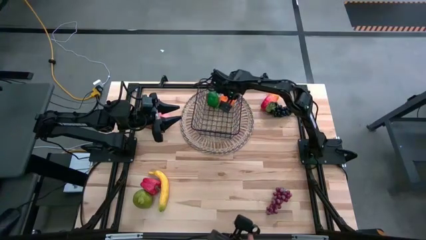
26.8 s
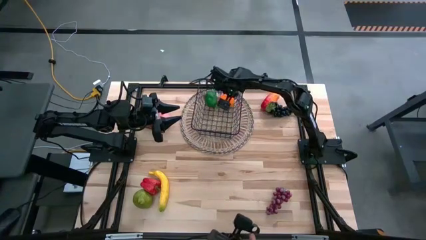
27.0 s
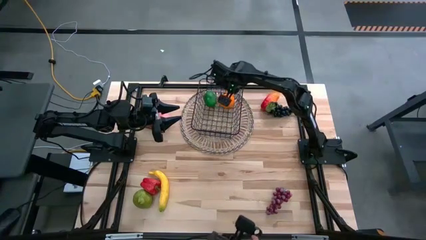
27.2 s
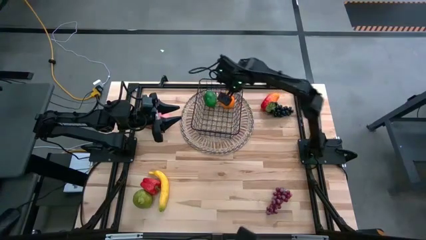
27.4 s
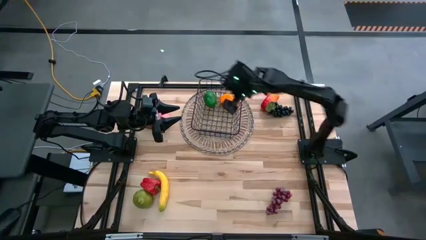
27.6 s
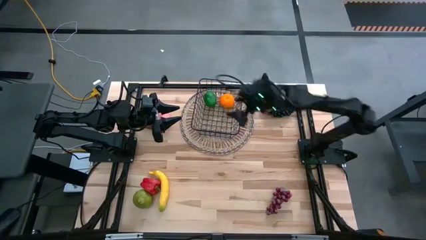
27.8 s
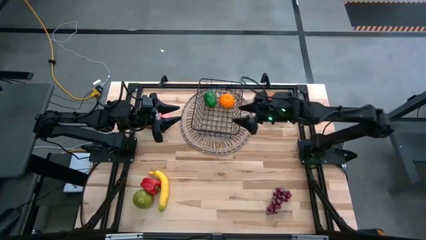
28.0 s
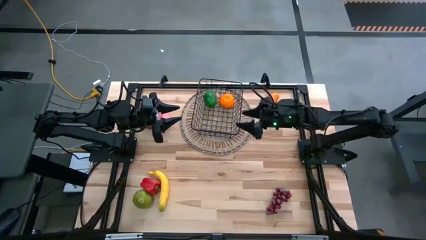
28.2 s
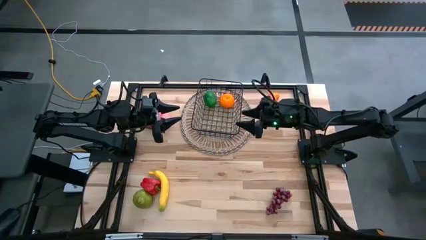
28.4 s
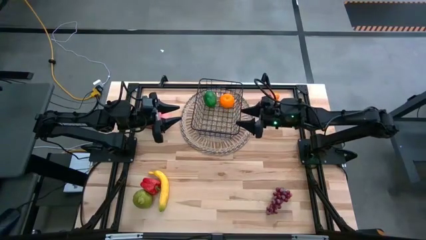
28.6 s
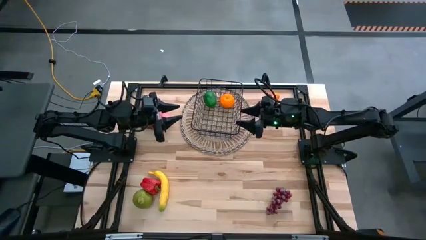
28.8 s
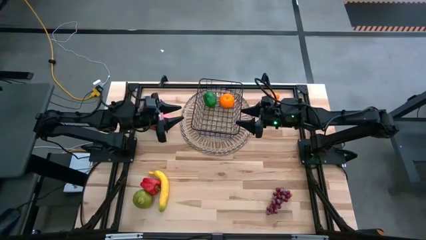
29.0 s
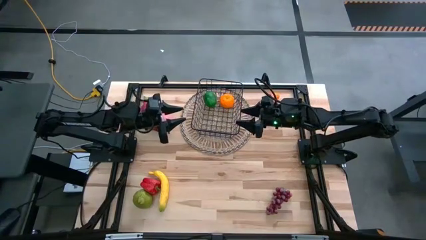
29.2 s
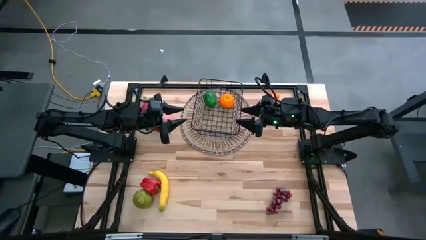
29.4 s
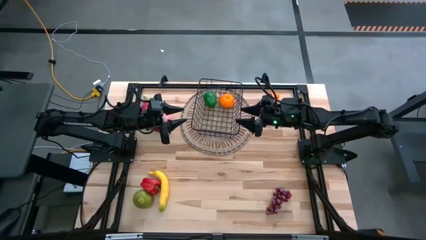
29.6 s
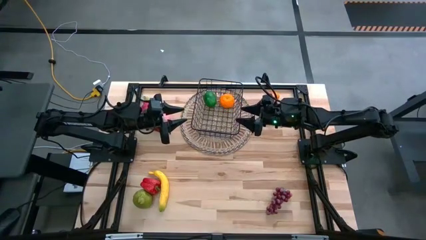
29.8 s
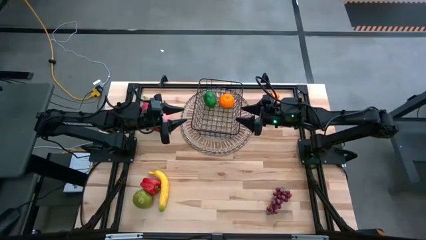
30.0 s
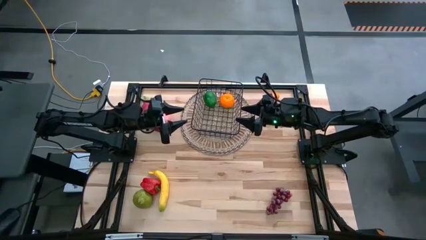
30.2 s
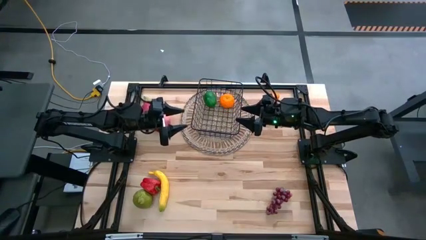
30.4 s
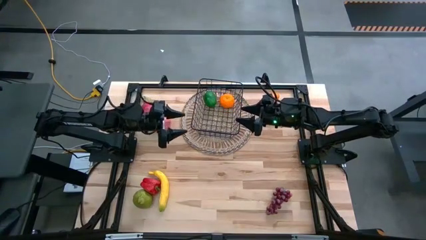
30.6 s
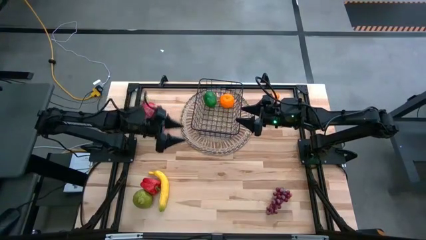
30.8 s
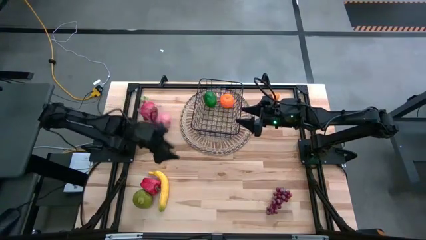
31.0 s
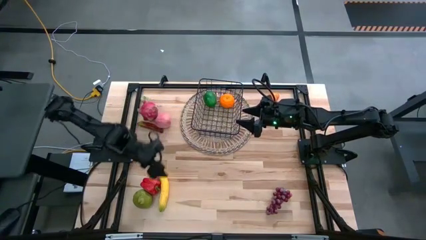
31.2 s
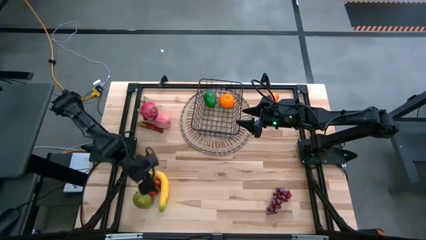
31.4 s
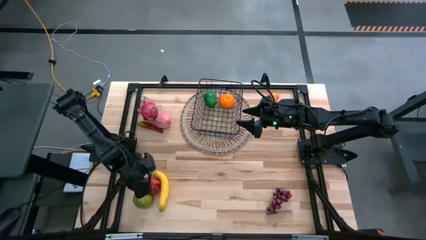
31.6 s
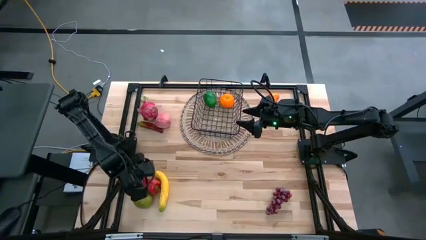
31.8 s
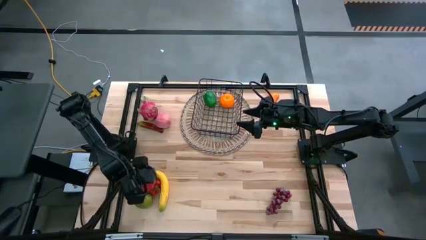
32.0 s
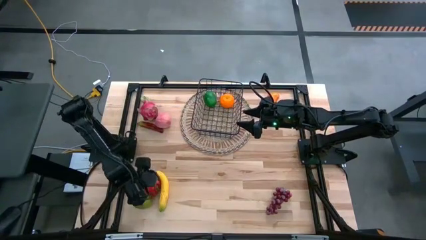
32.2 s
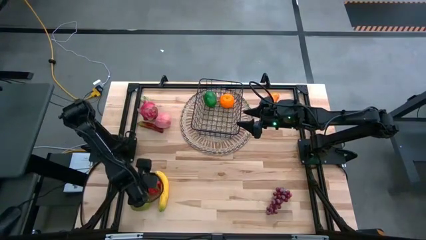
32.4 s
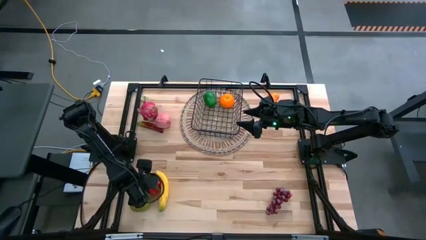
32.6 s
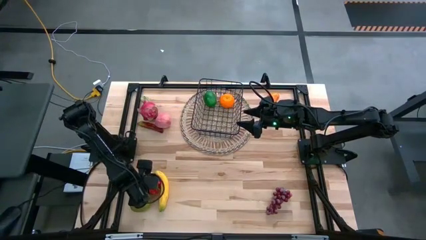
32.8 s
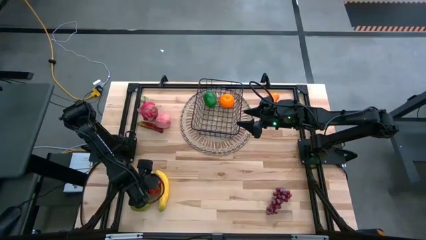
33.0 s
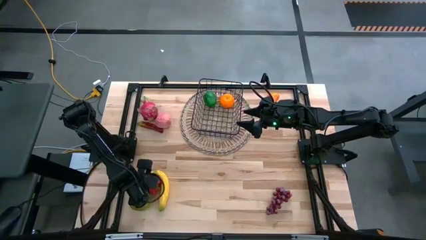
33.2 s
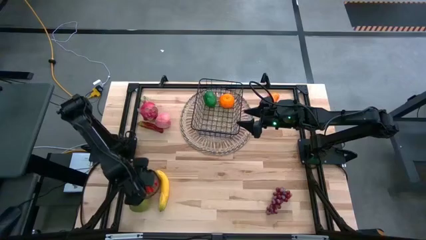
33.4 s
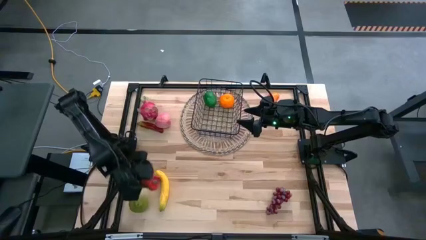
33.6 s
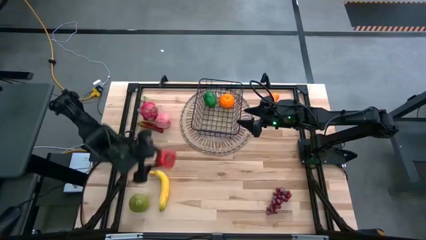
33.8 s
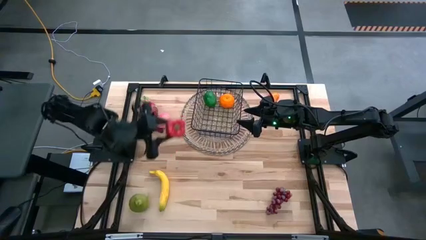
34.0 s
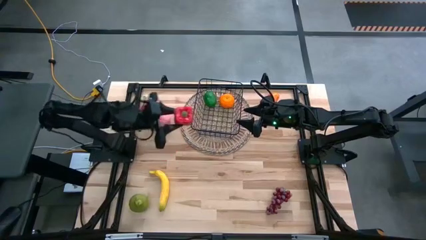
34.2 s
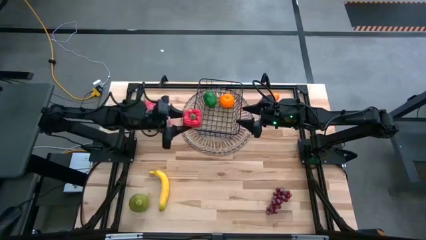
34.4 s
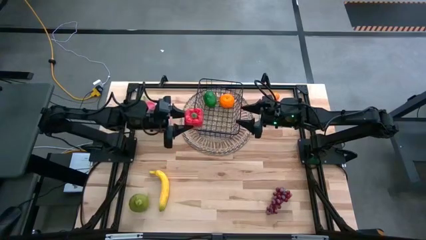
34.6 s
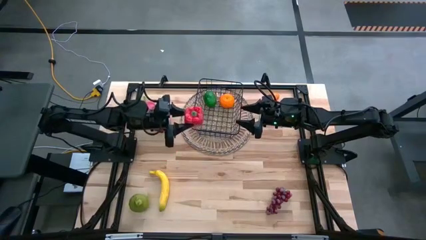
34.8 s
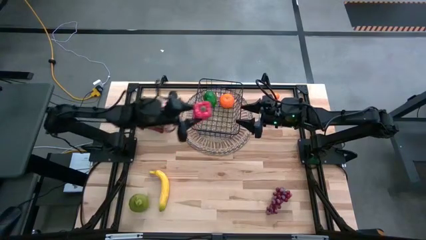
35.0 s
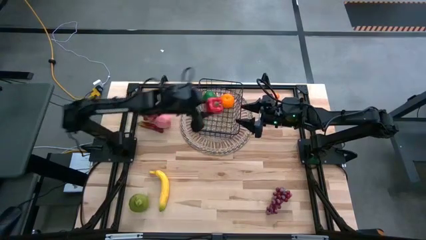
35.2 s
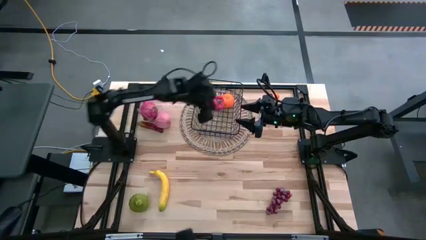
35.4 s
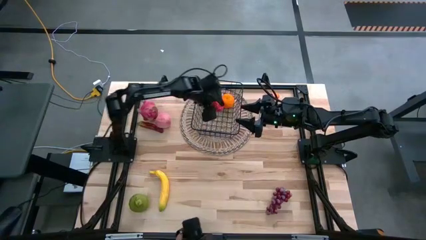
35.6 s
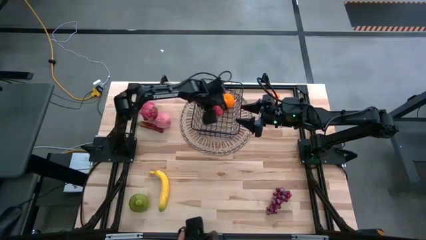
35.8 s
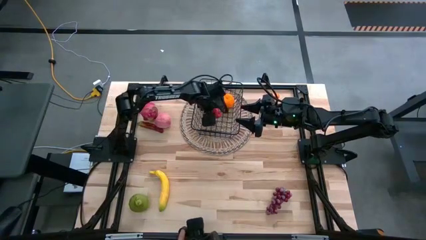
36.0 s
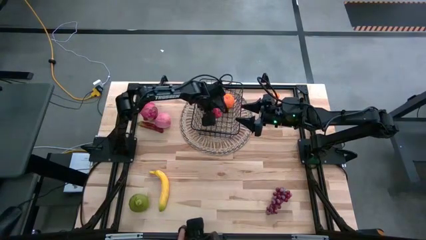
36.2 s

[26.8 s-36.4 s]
Task: Build produce basket
Put the red bell pepper into the black wire basket

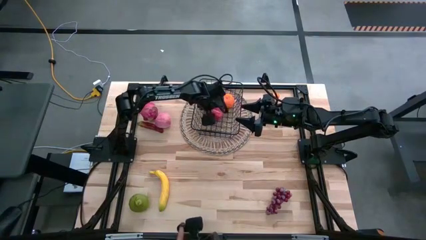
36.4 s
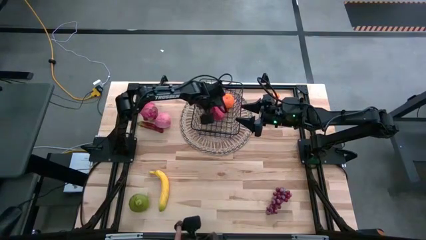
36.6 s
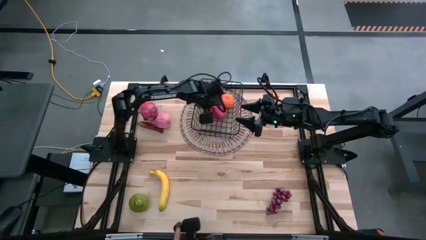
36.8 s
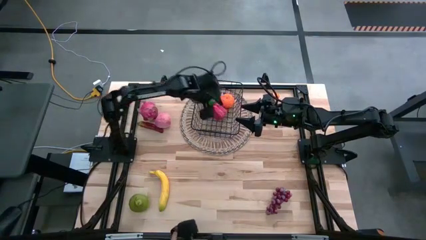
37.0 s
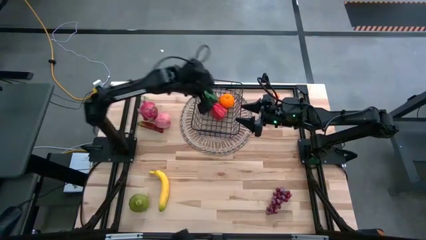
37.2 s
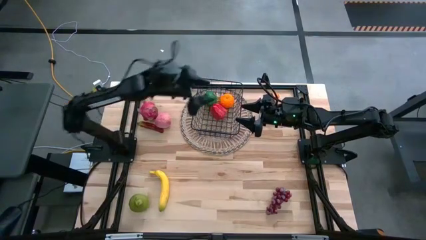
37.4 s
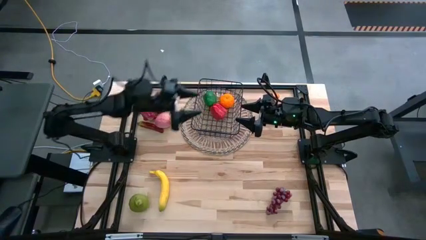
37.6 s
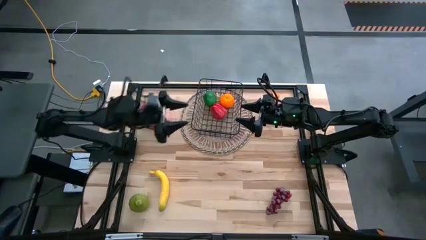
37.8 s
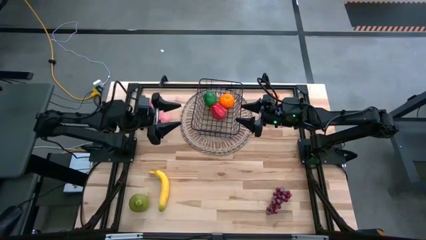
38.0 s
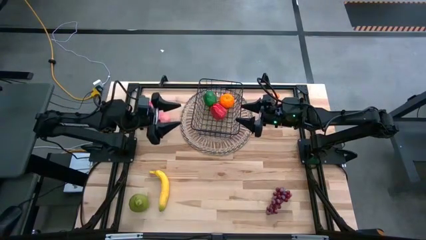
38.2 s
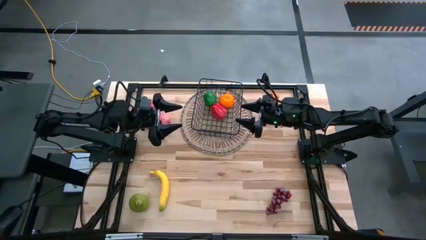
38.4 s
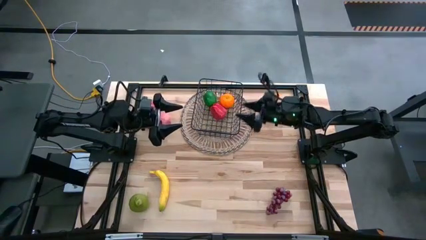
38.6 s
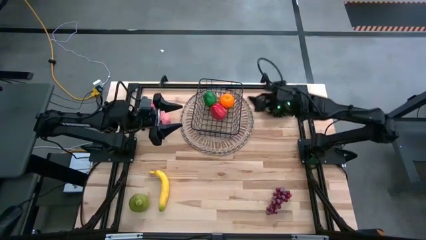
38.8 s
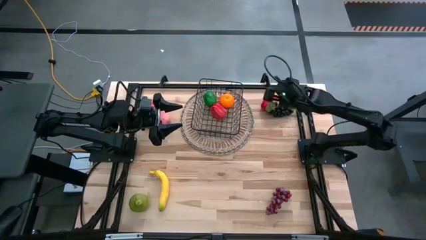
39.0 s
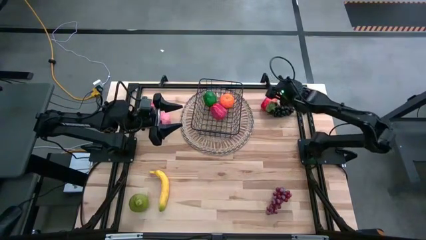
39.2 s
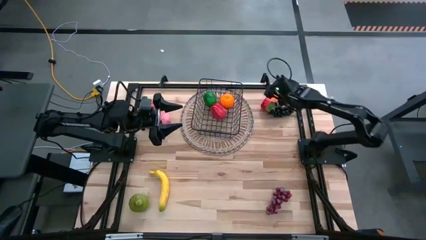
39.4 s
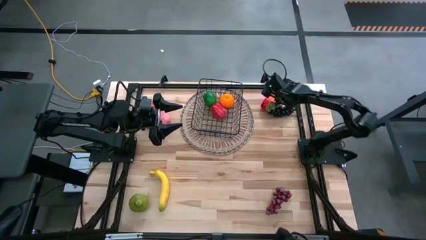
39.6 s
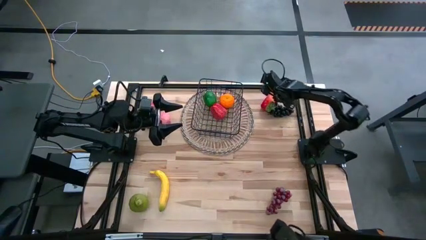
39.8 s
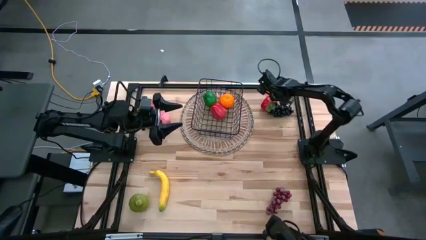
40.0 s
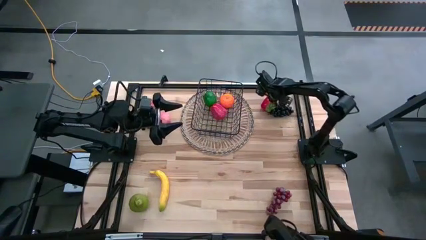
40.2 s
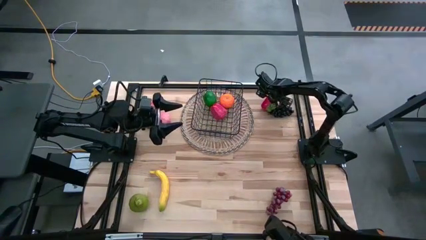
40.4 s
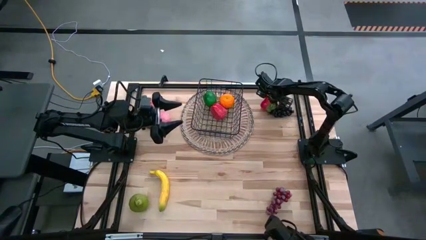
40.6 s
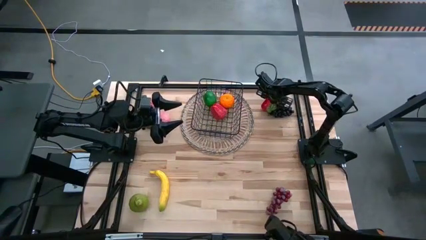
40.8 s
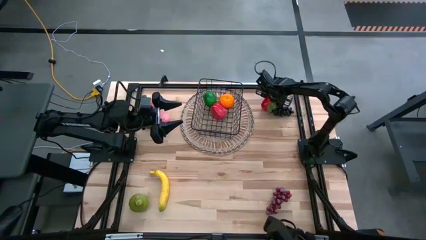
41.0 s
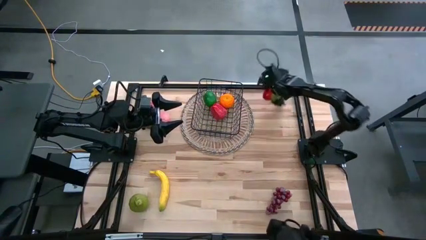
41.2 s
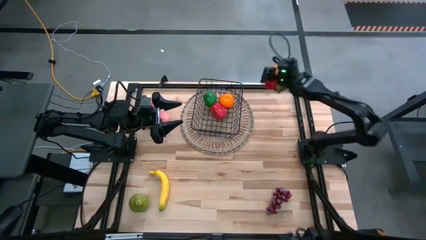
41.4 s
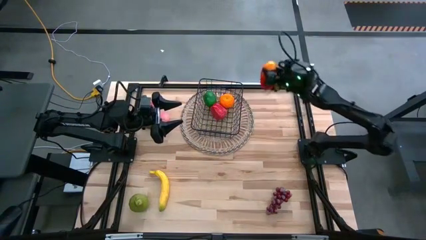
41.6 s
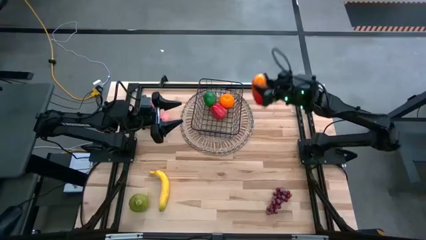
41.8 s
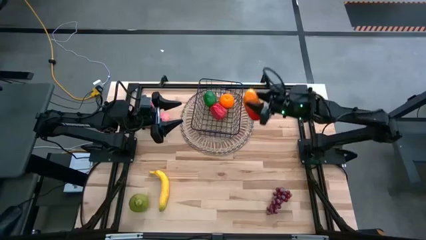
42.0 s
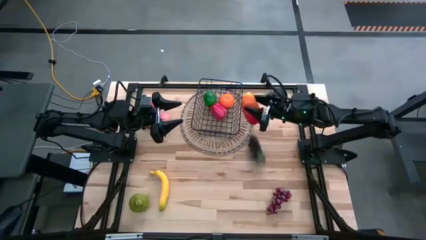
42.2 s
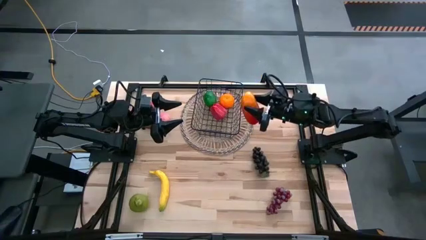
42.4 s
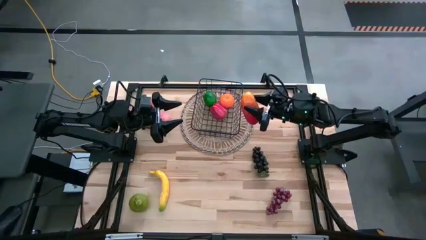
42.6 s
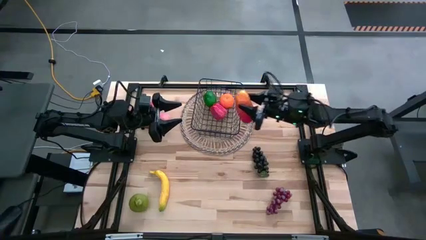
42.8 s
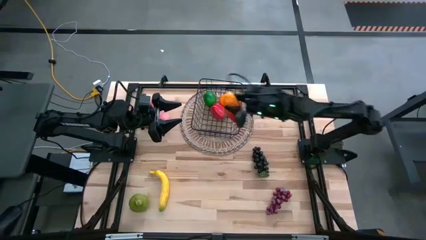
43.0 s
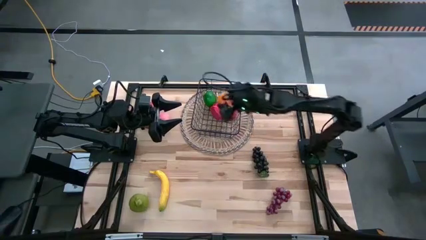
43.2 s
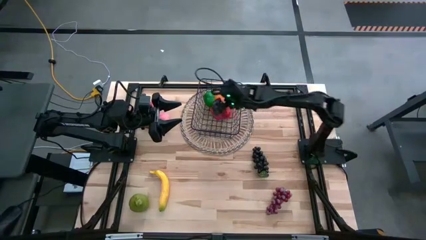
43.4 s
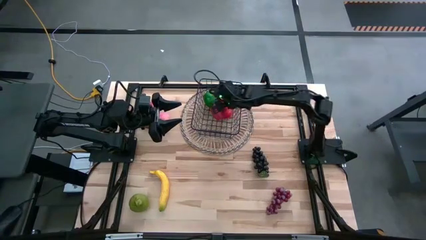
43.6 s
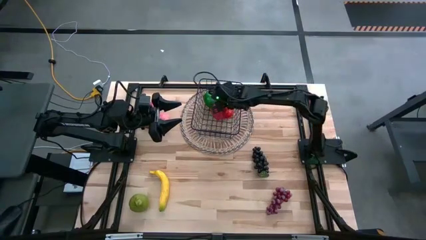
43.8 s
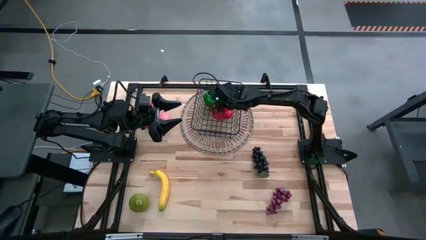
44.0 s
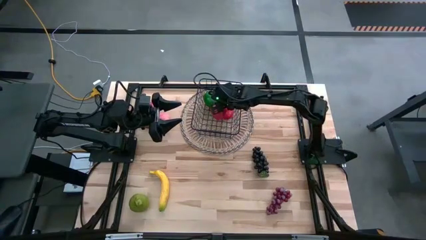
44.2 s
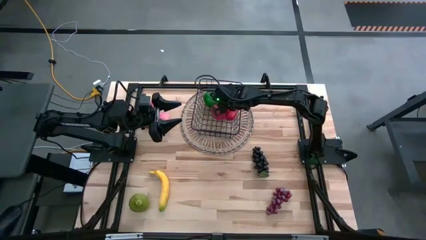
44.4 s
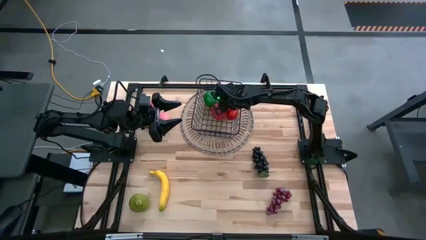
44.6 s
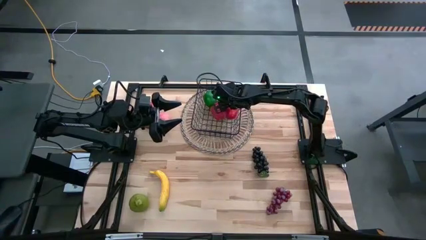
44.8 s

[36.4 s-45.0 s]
Put the orange mango into the black wire basket
